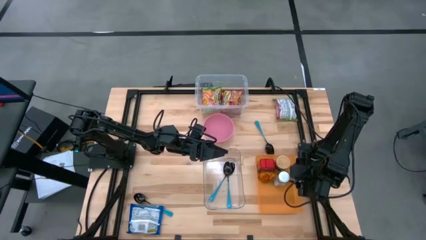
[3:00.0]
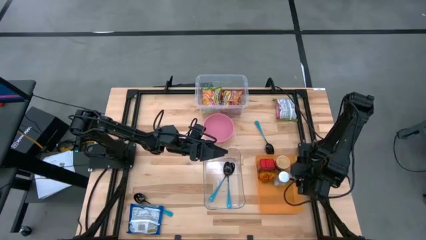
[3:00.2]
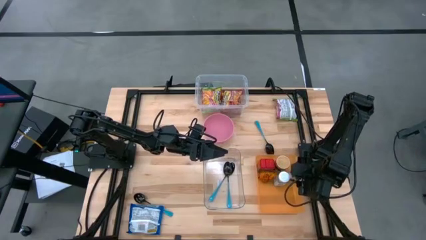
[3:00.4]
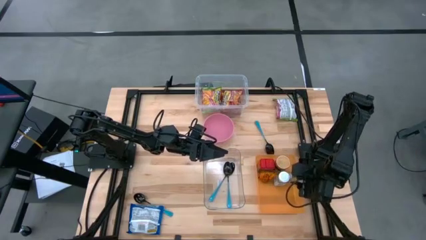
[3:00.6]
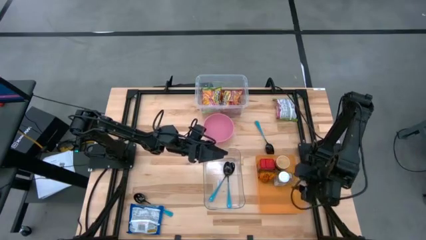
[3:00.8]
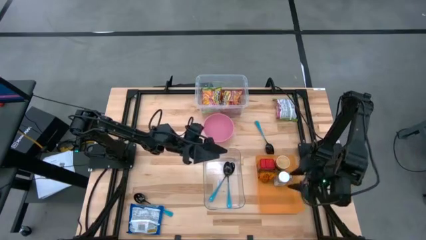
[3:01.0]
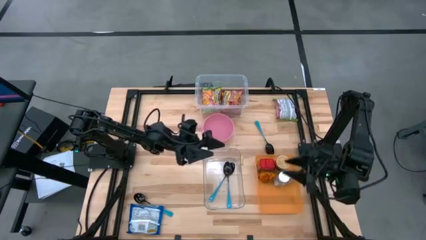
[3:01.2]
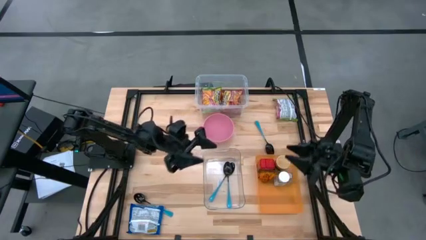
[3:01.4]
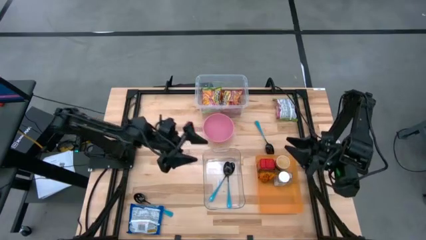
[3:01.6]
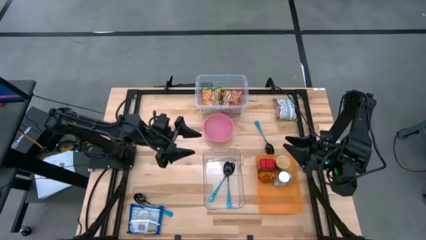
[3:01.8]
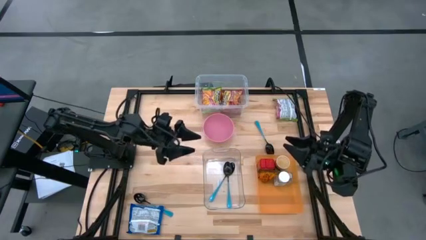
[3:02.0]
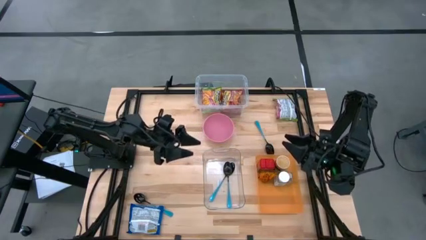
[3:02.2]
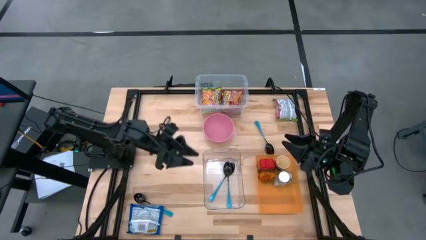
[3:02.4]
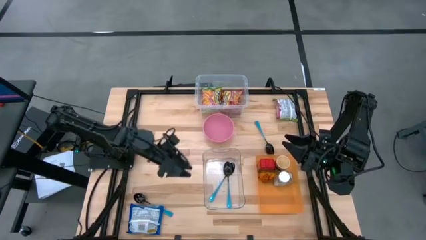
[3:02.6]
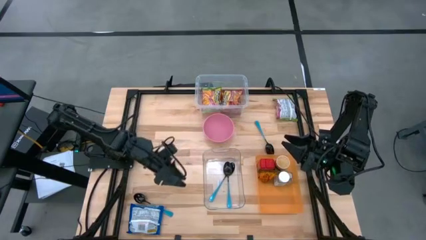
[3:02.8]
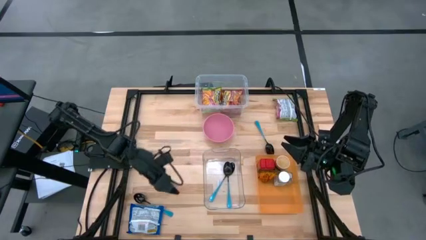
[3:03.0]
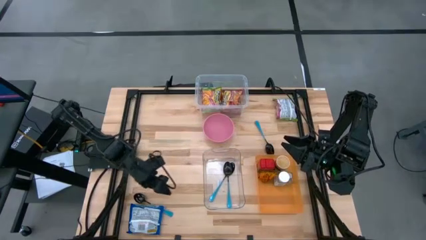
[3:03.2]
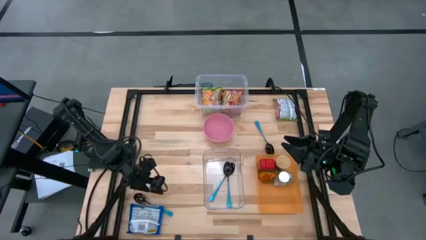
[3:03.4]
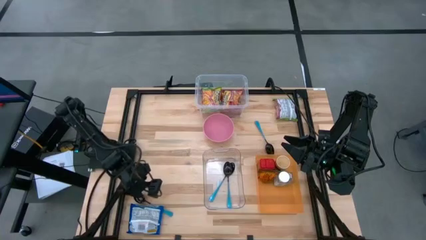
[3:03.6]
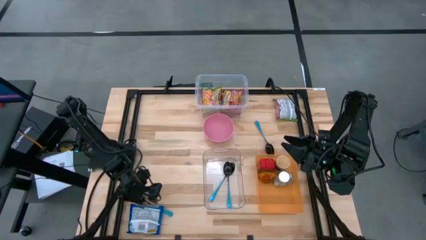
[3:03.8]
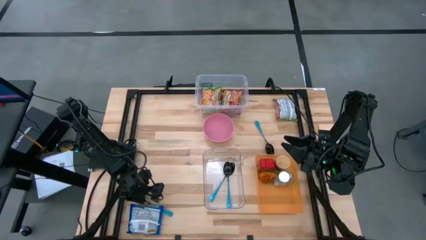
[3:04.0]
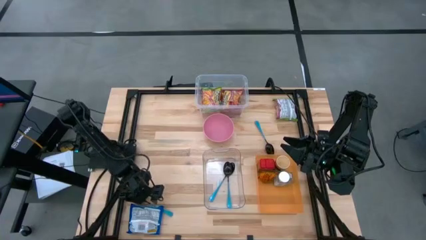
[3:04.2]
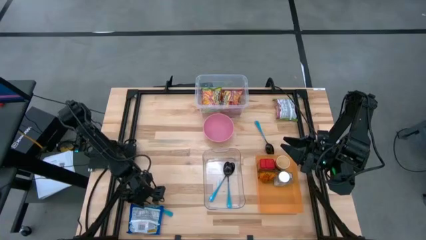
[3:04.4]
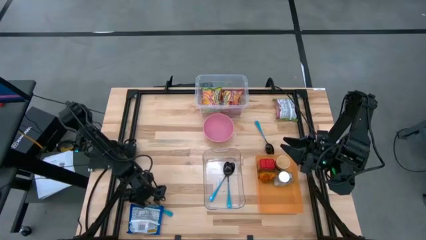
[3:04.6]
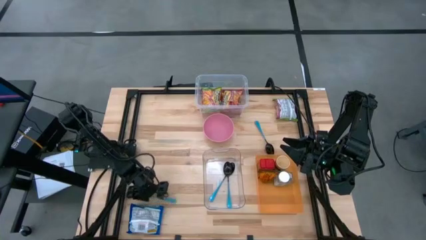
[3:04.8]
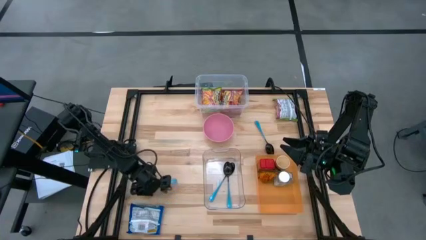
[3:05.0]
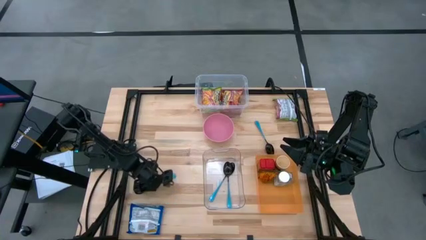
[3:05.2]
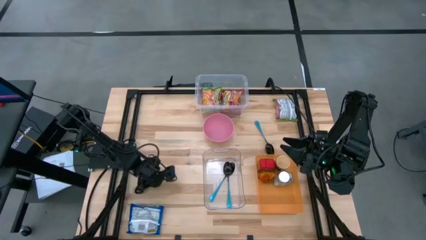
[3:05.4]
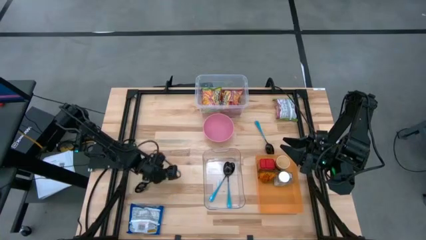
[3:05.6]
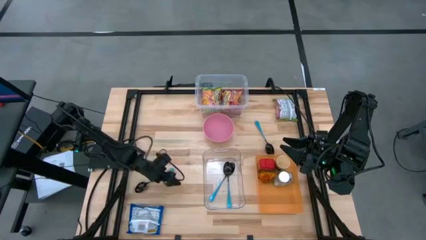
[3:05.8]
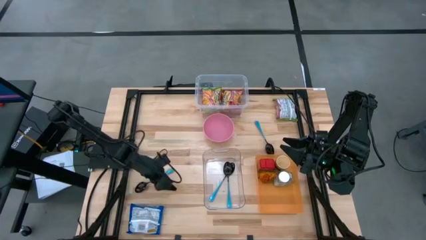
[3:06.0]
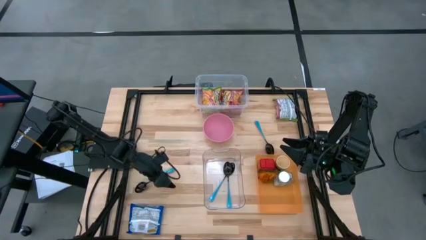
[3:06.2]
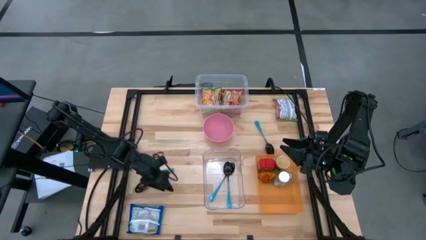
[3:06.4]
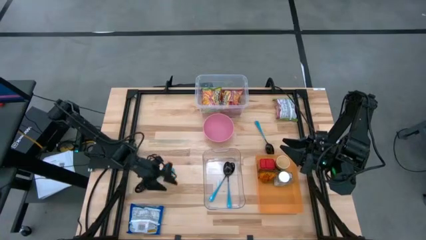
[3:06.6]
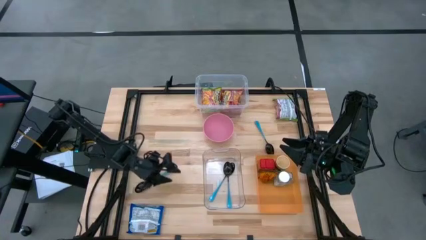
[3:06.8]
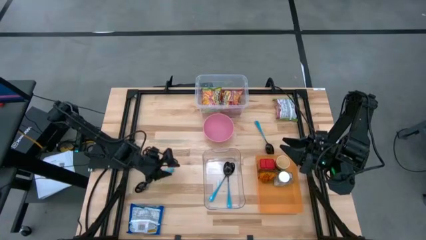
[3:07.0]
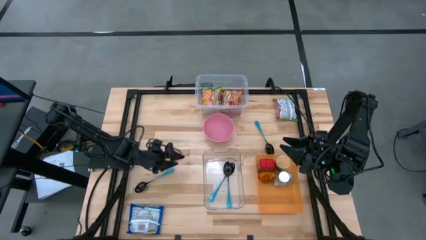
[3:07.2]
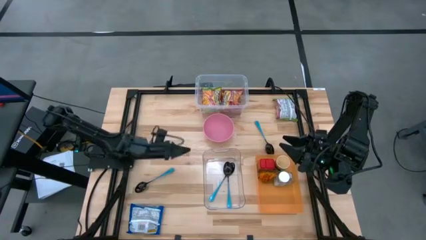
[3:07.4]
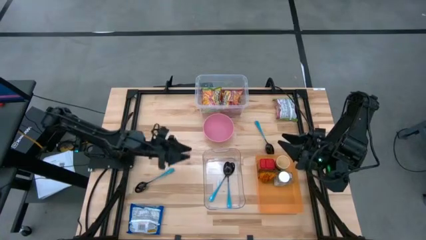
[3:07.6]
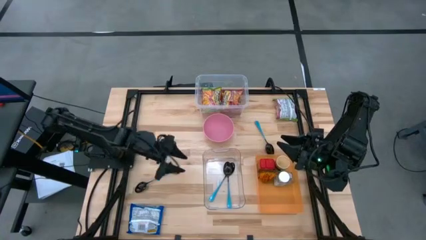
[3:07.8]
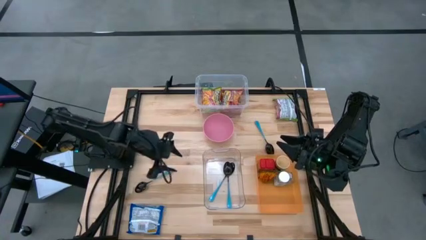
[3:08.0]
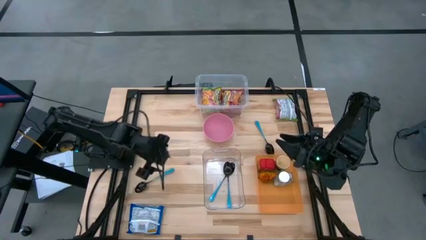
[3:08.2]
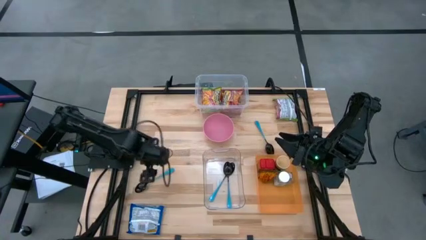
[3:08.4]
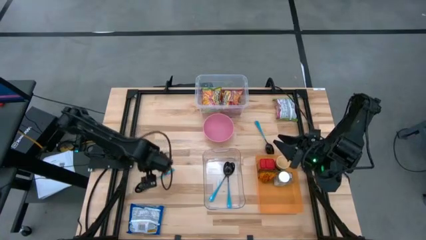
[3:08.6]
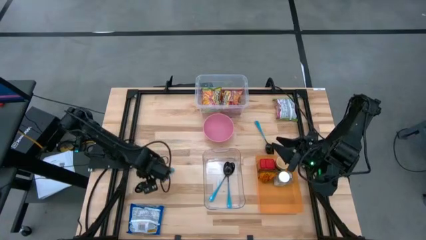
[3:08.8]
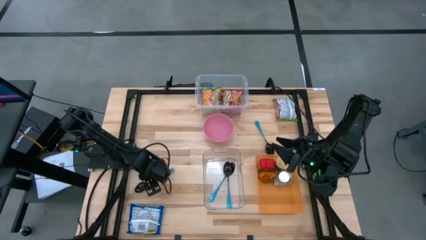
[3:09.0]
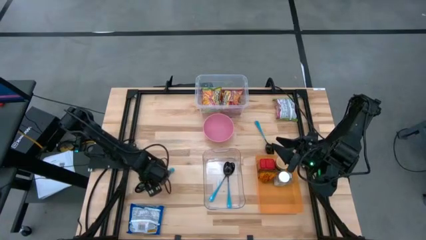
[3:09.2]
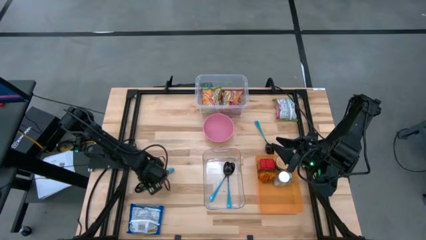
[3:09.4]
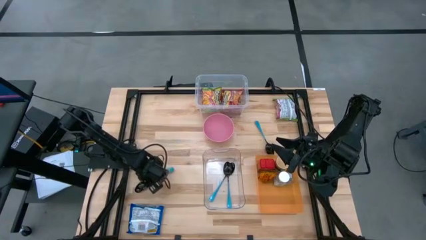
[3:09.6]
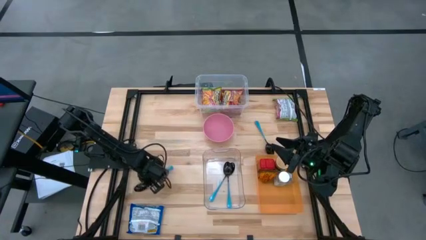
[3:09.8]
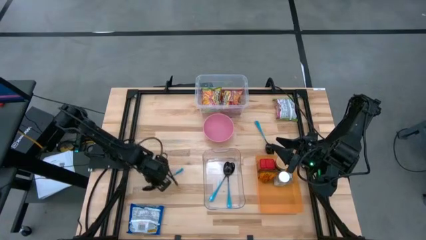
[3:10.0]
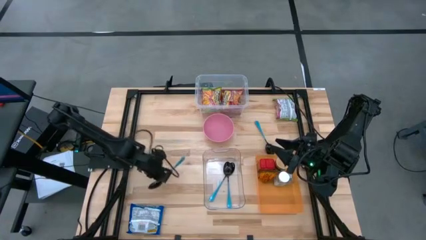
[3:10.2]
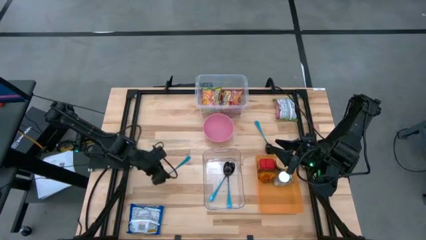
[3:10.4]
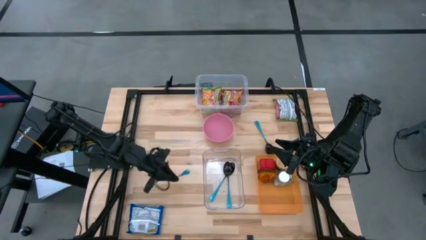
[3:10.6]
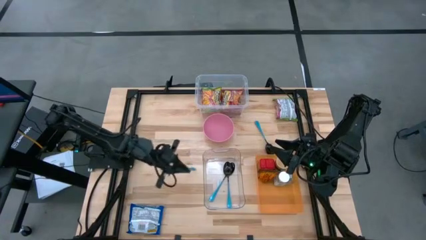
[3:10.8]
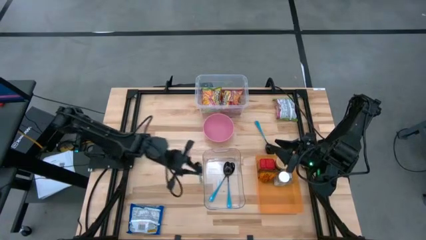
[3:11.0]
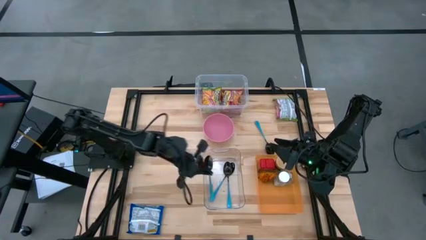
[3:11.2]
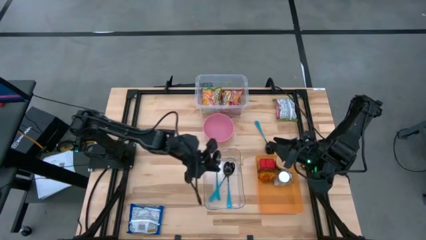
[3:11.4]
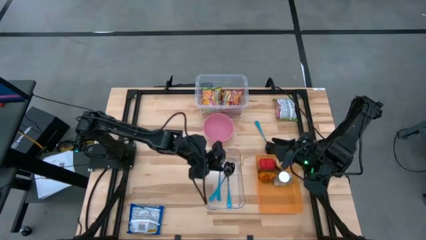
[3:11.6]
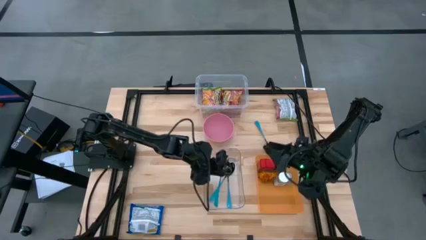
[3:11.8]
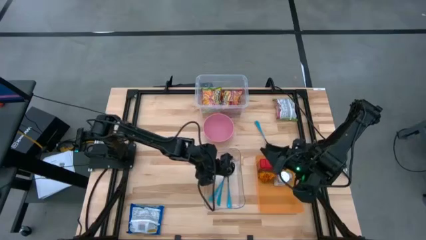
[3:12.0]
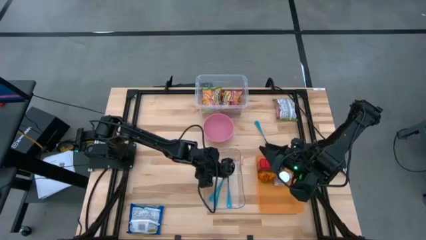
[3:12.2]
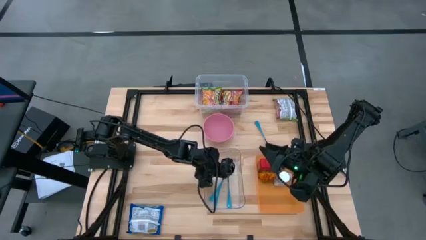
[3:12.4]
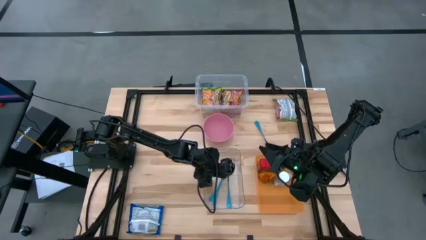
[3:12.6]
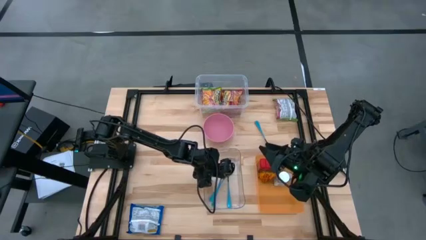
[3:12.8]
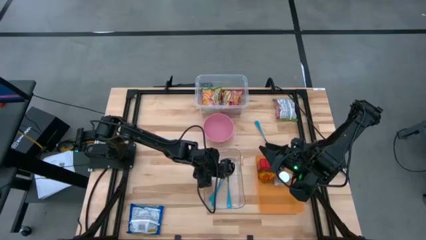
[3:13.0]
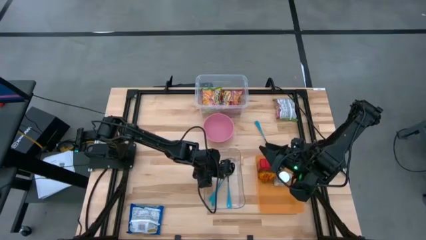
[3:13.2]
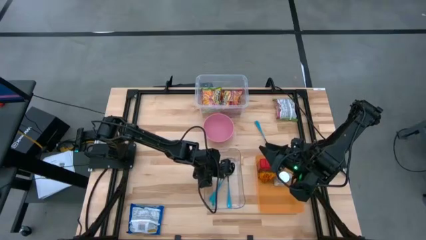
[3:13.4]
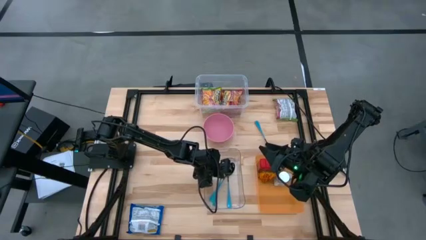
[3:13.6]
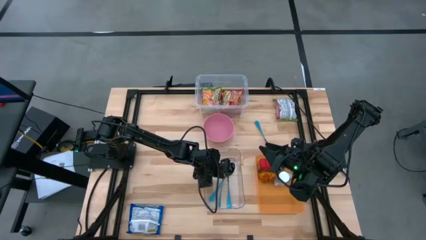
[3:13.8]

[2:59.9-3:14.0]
Task: Pick & Place Food Item
Put the blue spoon into the bottom transparent bin

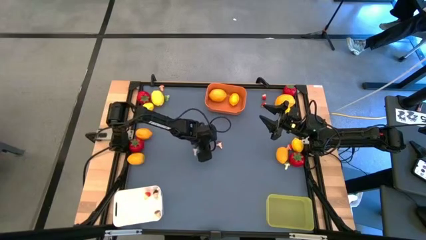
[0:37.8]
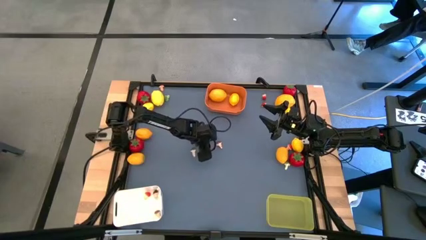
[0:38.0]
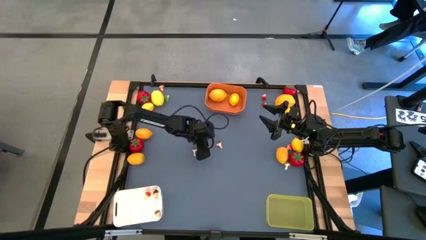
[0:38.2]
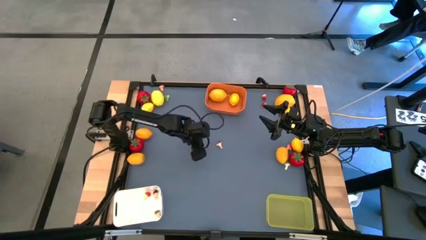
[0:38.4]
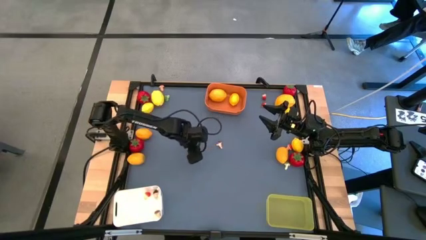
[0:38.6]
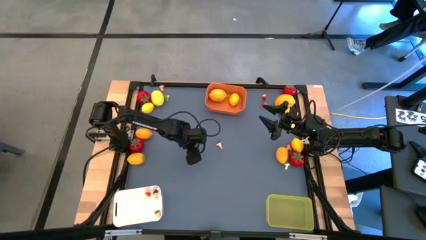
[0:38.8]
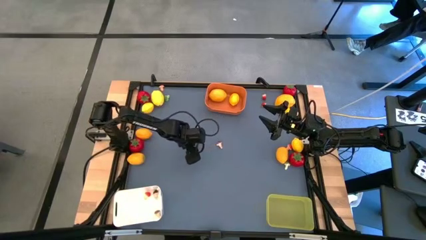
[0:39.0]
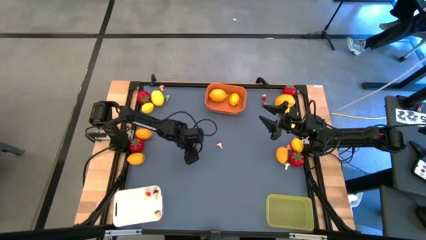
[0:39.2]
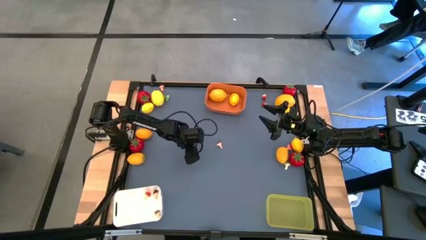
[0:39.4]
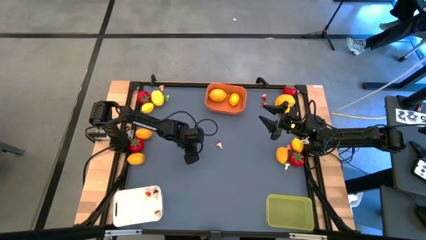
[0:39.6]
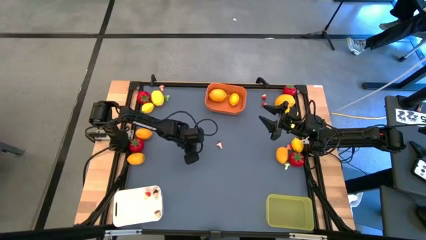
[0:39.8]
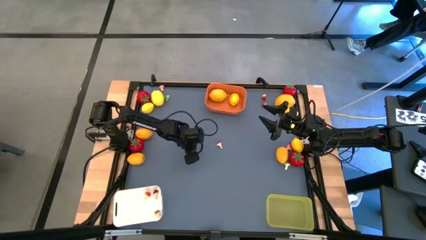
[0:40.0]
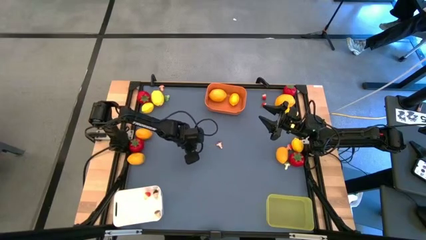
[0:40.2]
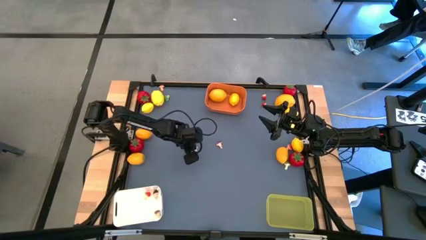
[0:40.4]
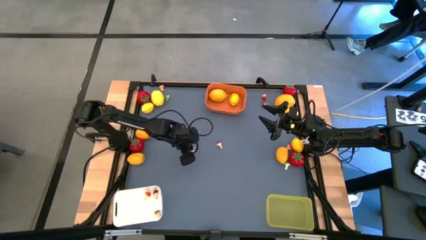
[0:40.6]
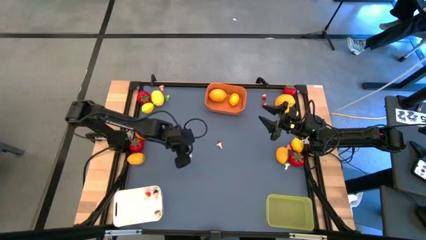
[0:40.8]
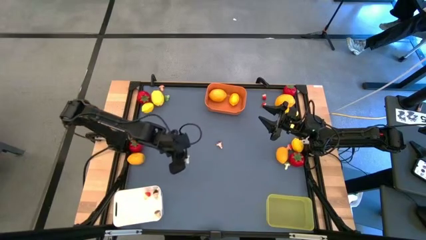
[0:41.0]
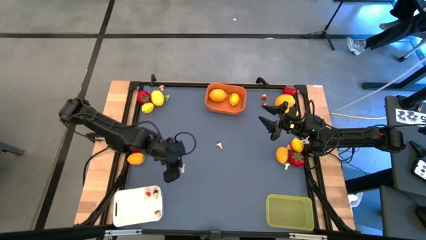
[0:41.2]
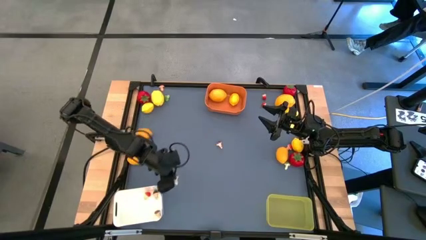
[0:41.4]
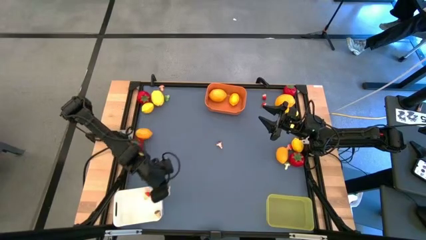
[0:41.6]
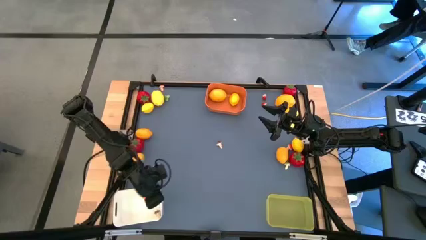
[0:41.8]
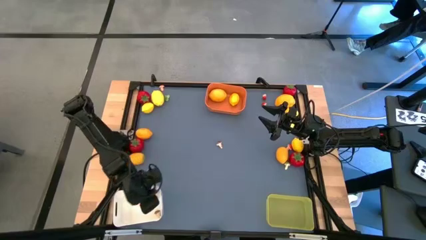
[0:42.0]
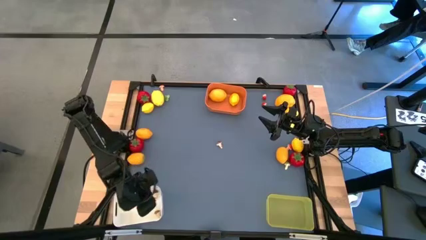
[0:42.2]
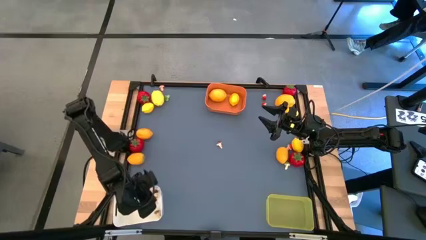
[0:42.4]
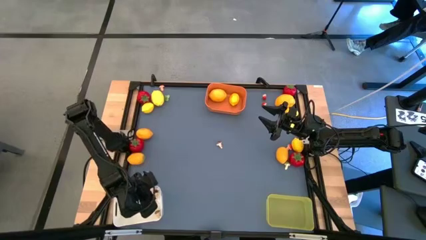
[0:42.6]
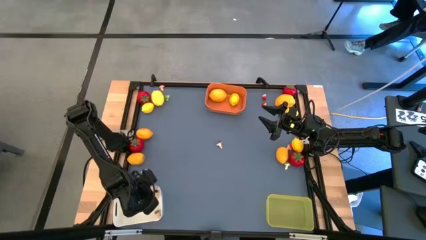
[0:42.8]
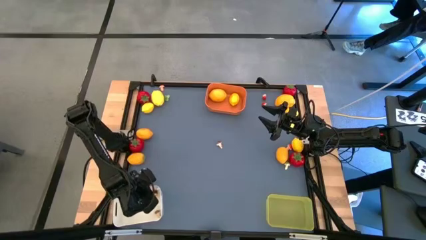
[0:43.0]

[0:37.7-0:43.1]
Task: Sort produce into baskets
Put the brown mushroom into the white bin
